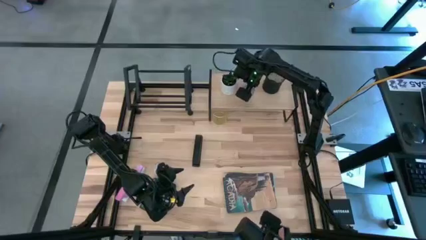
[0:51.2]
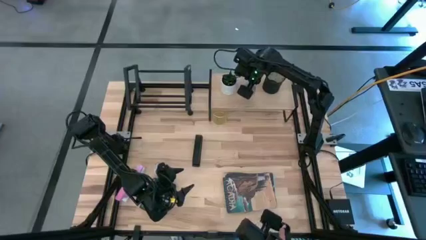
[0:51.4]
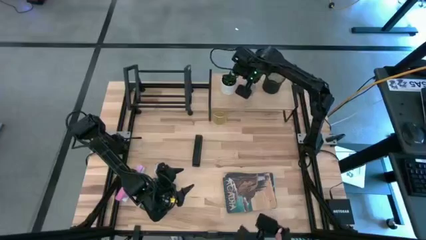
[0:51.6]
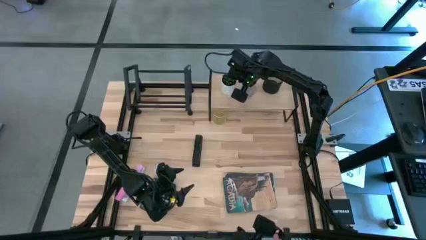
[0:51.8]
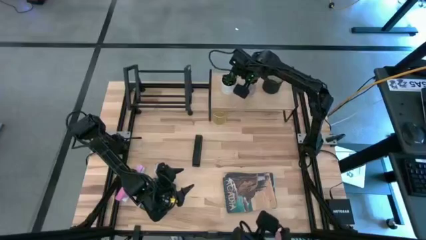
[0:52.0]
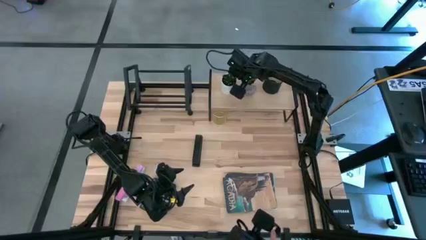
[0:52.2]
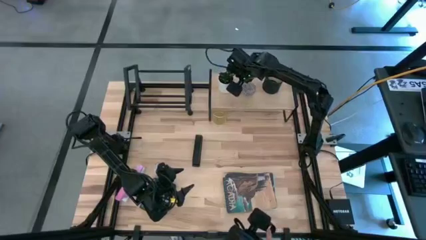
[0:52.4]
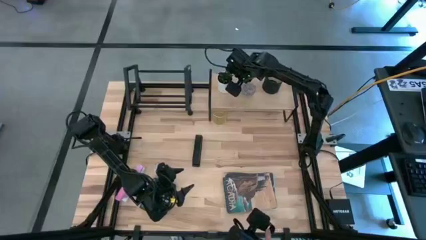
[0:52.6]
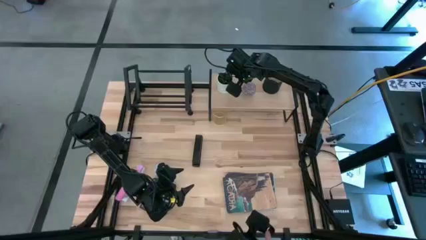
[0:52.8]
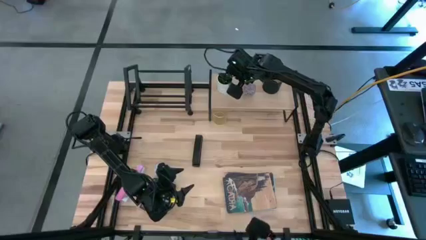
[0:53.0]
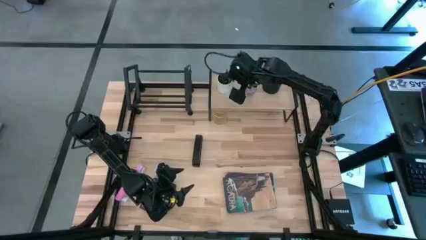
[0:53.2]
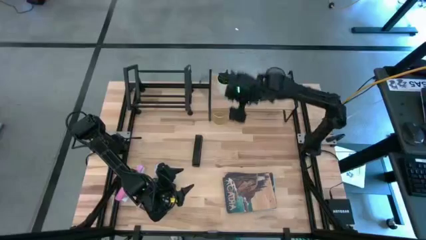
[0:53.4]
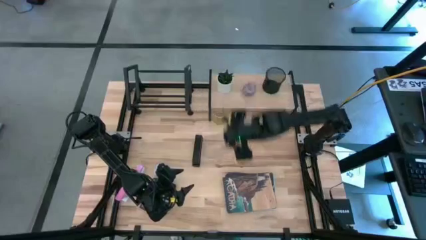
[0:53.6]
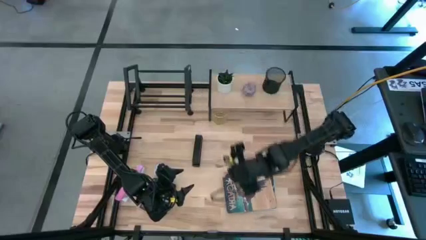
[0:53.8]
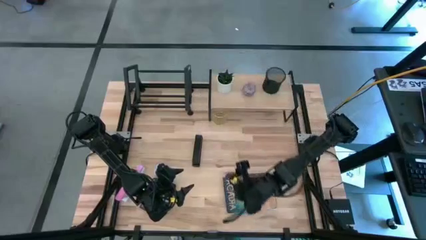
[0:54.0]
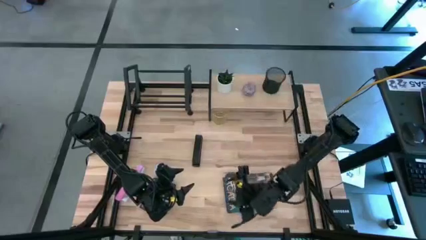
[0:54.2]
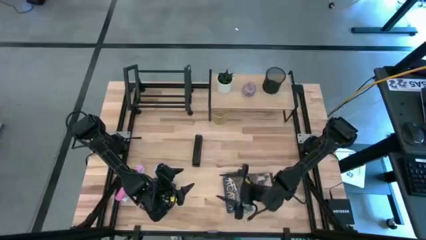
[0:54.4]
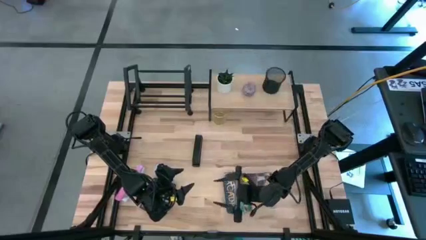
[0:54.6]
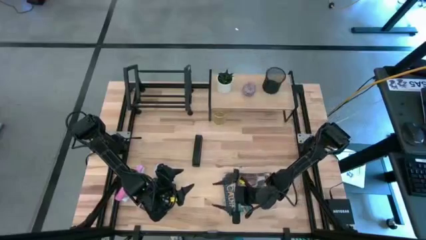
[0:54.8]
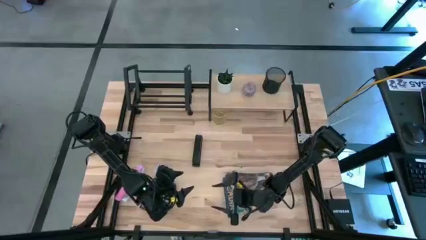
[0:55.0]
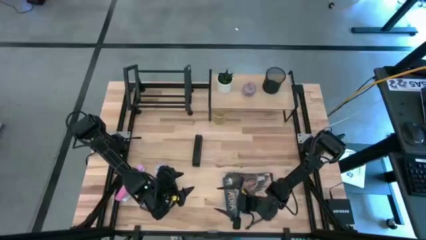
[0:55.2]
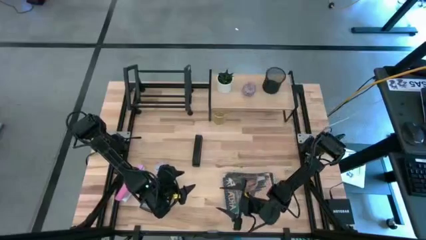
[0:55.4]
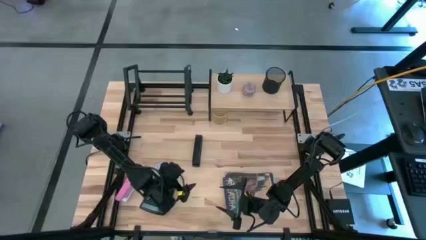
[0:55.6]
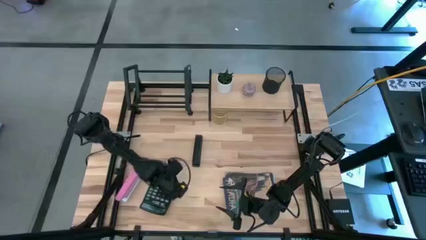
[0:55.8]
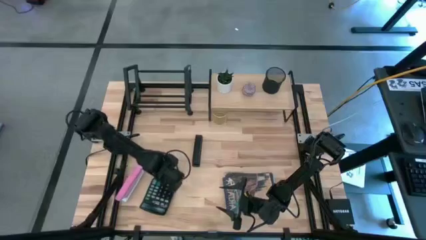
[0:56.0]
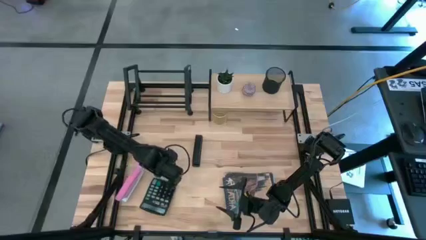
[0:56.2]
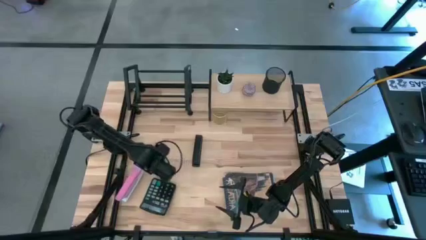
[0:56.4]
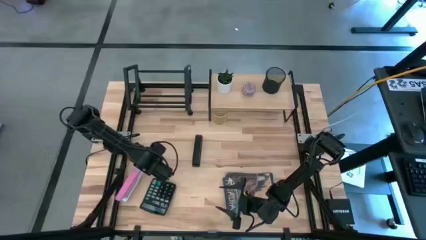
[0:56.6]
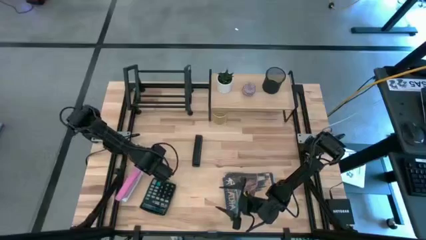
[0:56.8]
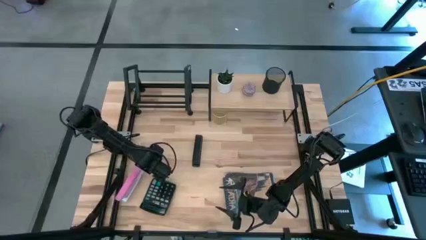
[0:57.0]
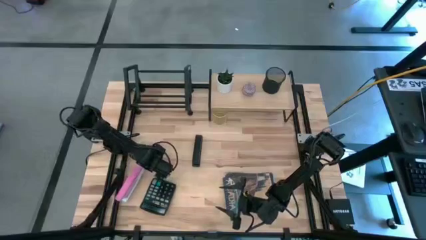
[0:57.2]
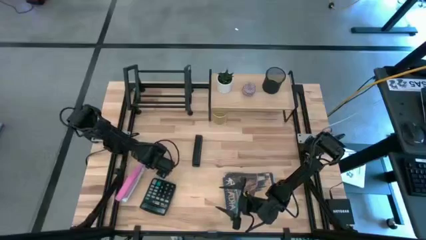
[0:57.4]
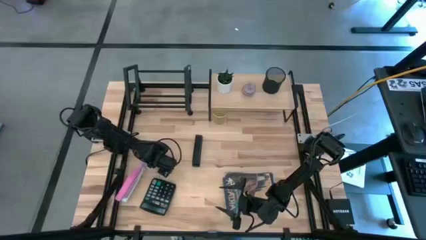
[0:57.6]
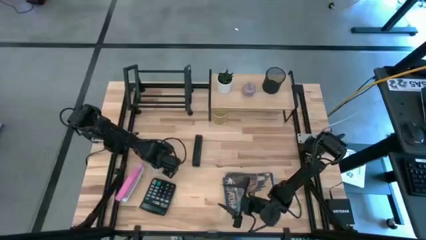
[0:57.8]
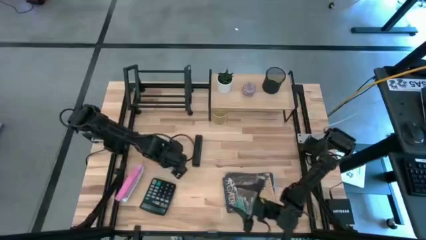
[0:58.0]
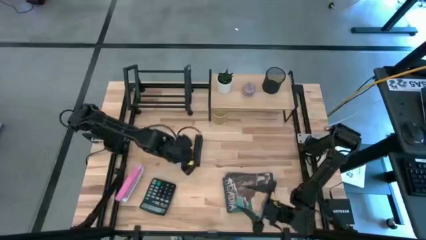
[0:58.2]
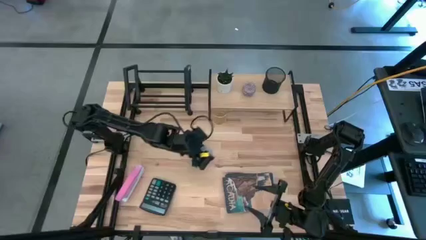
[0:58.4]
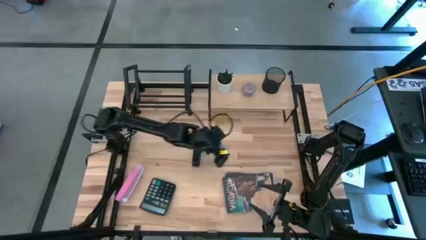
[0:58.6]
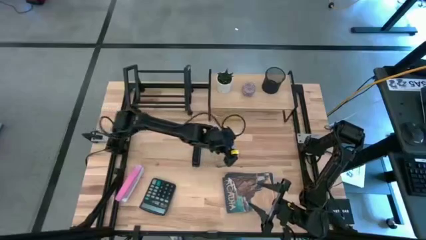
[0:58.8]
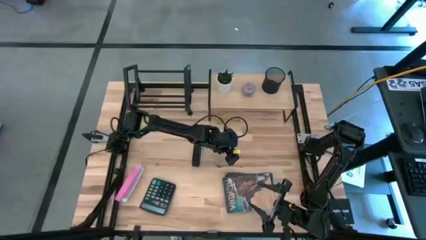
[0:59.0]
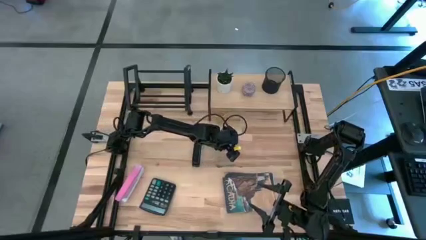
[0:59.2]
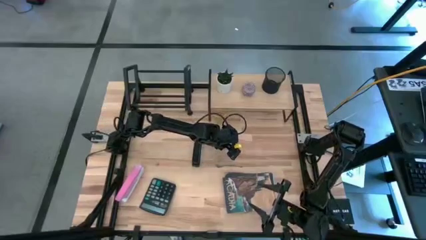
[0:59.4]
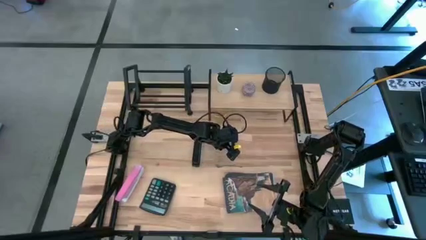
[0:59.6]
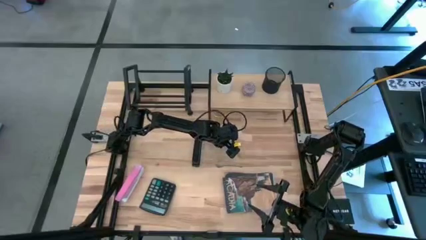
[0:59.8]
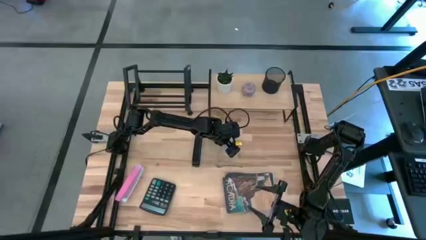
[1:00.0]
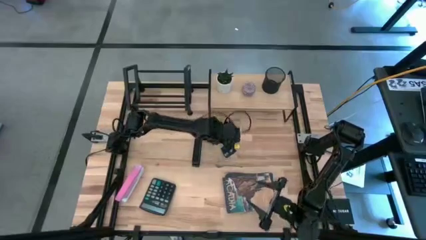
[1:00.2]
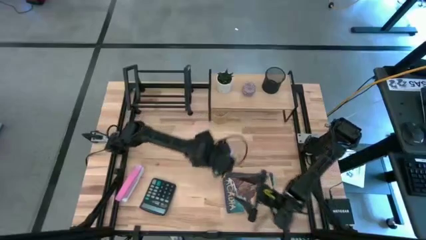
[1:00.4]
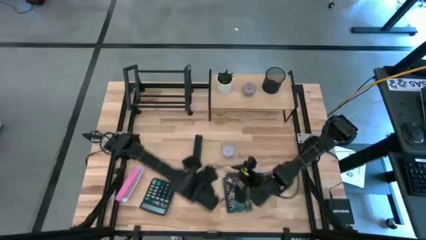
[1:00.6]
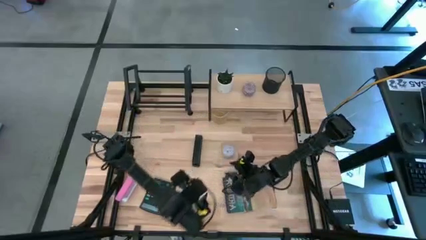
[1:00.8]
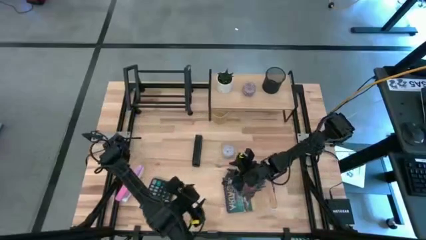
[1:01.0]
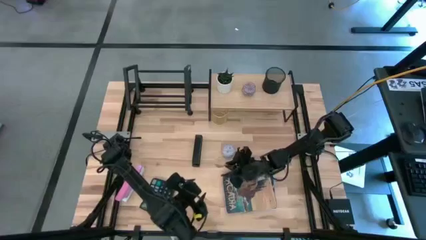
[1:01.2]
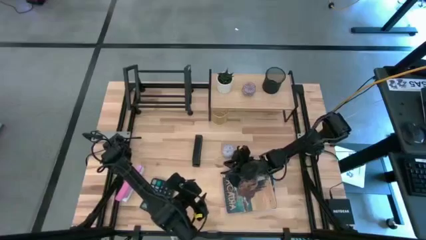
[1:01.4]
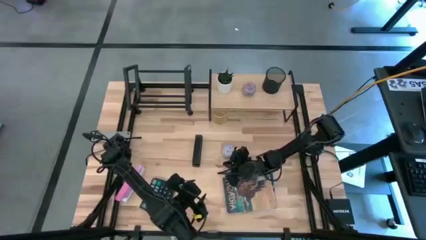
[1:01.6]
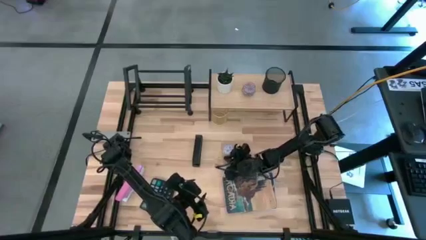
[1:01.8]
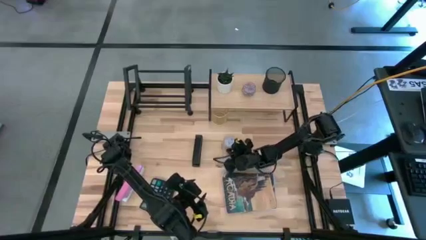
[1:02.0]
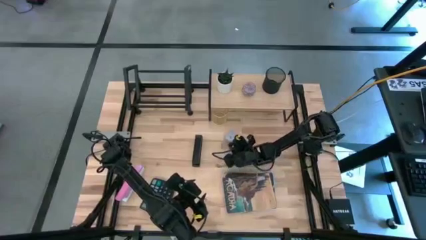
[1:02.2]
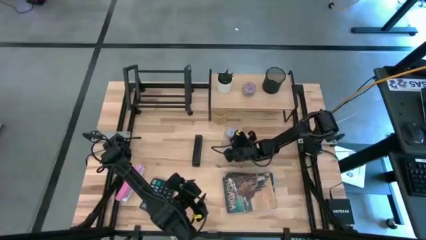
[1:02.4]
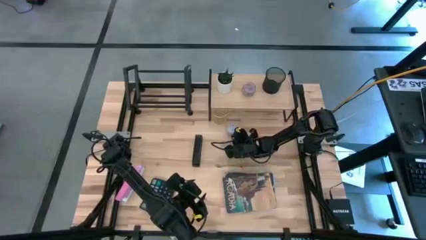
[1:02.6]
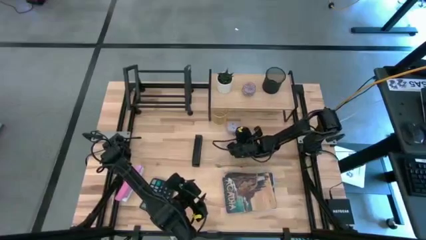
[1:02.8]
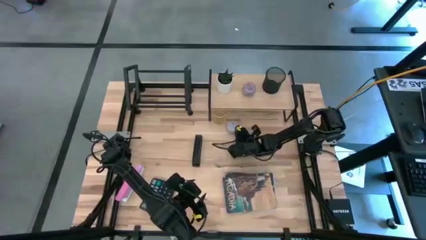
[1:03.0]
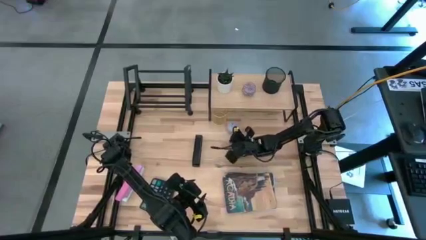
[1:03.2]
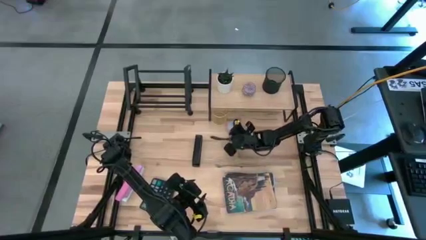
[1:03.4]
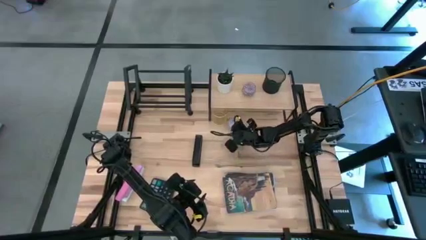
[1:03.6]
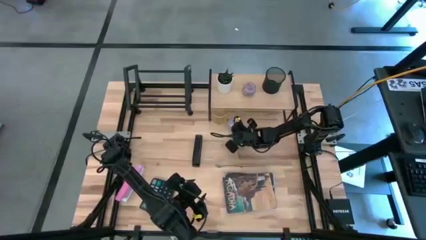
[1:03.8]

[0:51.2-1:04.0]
Task: Stock shelves
Put the white floral-patterned item under the shelf

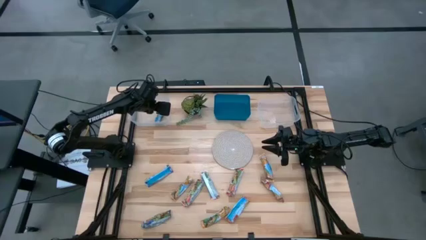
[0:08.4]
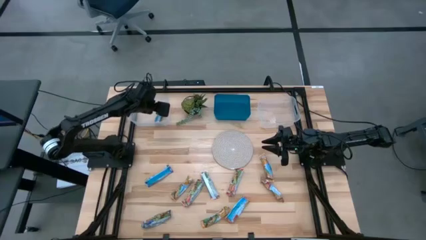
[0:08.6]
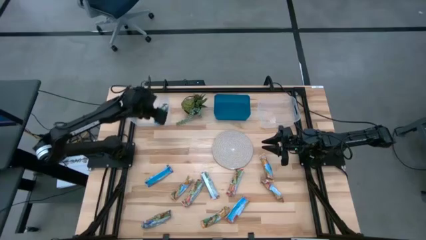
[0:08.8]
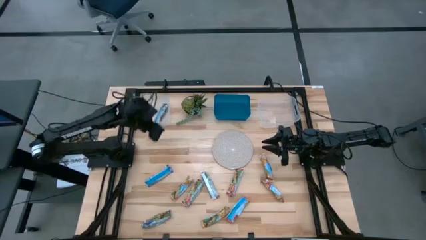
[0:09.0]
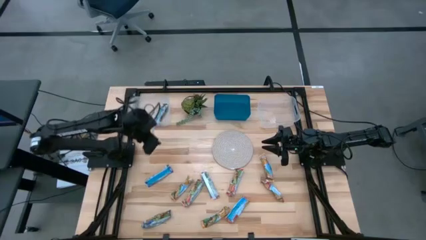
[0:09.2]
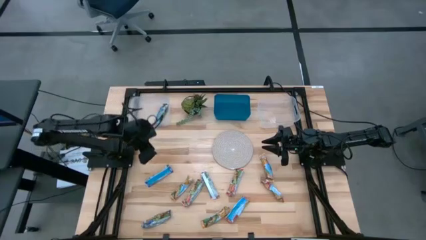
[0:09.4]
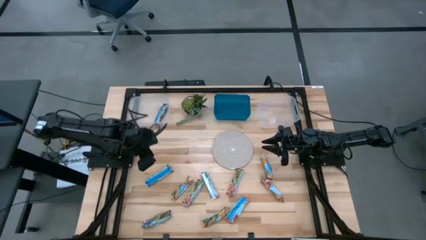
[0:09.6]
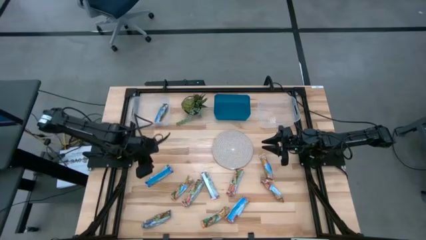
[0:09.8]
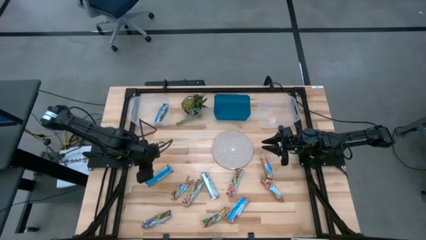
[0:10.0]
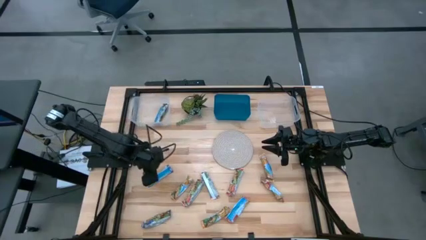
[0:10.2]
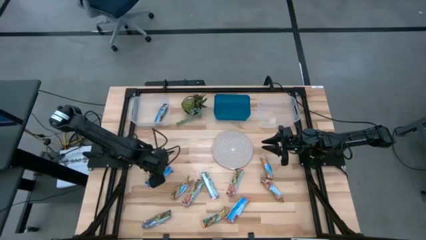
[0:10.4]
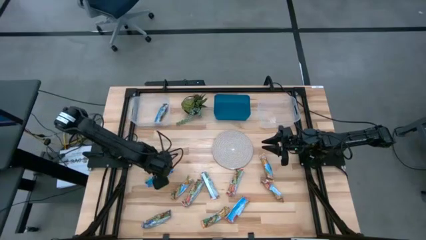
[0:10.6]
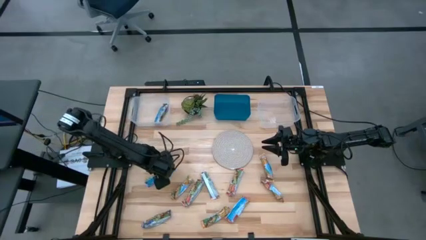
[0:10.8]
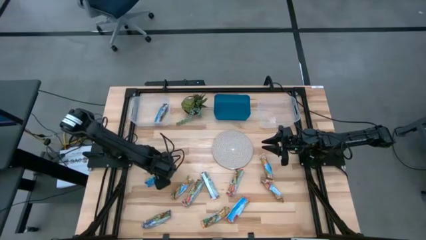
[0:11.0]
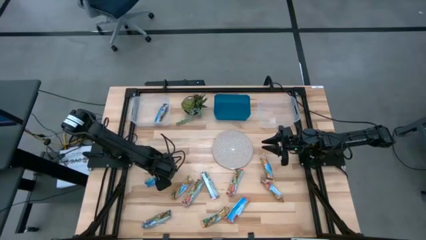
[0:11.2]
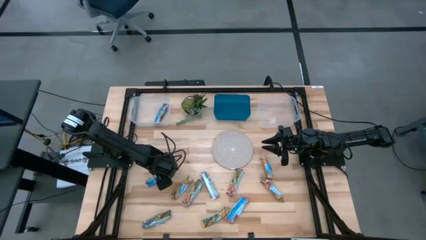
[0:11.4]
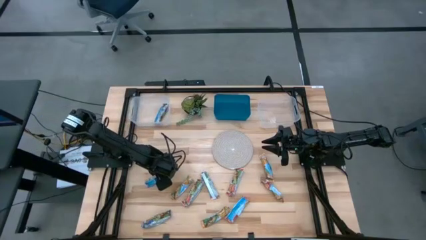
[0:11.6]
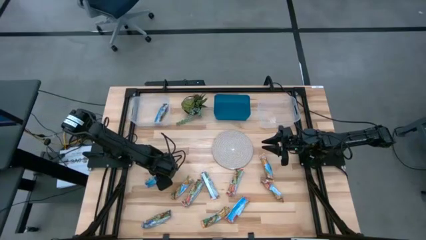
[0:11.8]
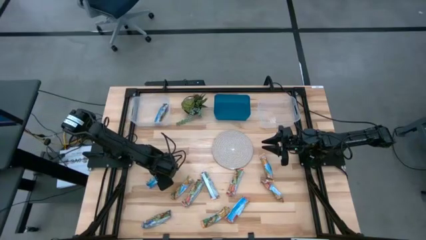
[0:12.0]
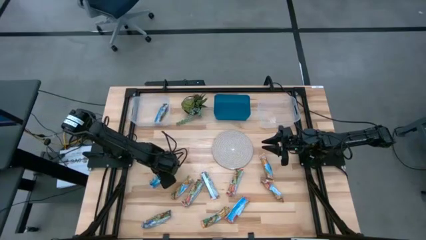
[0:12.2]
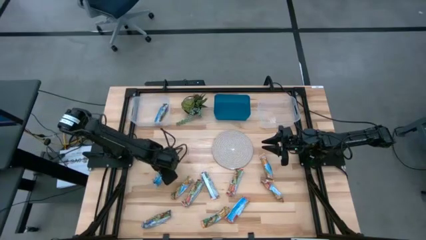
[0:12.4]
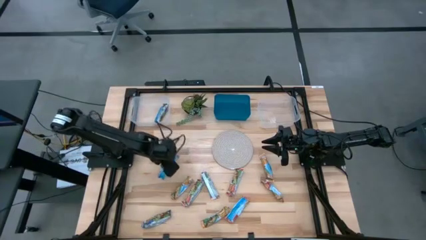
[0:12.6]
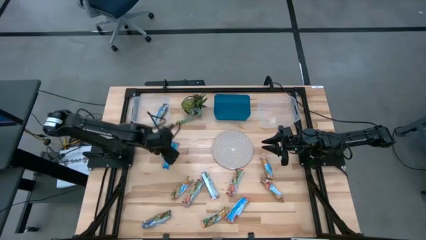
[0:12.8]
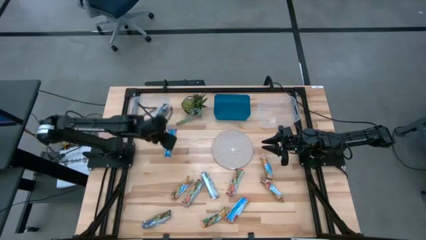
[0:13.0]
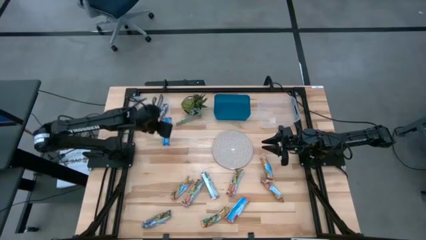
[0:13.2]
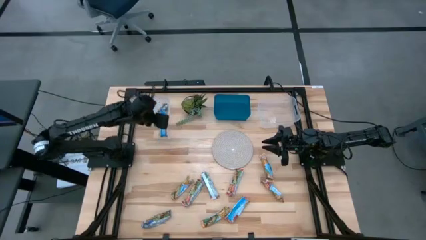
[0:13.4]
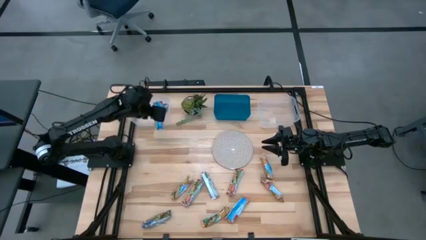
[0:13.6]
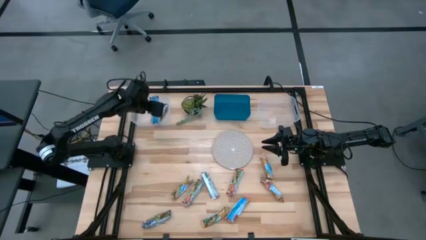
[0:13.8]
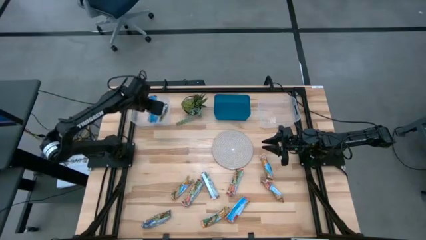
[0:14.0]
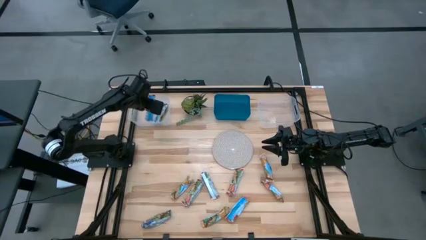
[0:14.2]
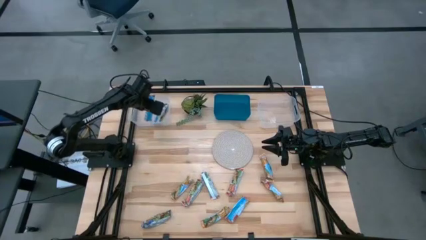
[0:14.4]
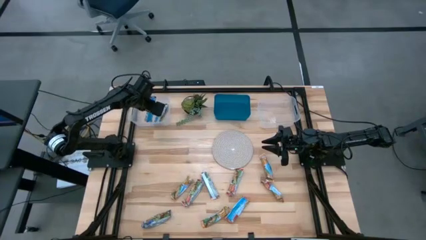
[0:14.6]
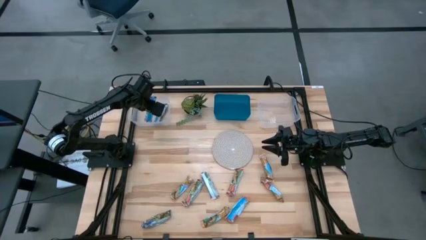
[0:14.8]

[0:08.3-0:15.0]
Task: Pick and place Granola Bars by type
Put the blue granola bar into the left transparent bin
